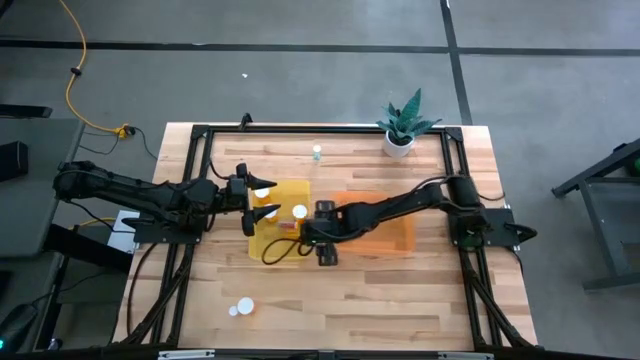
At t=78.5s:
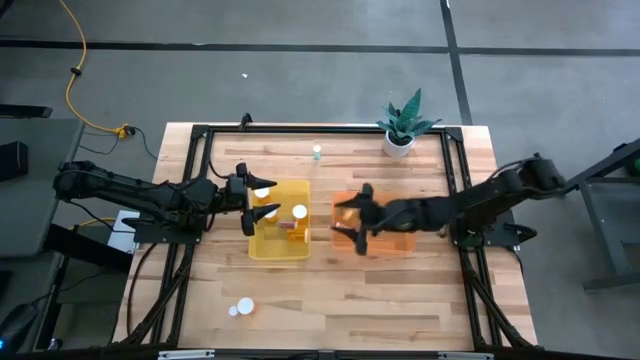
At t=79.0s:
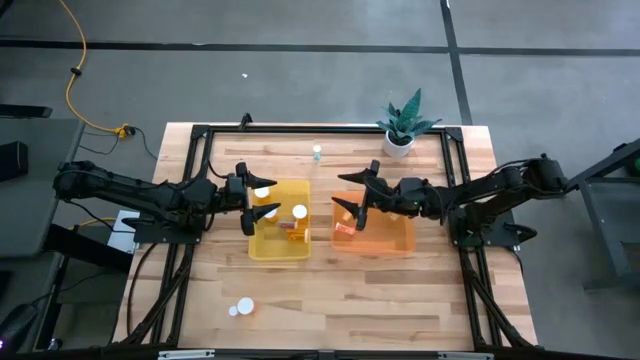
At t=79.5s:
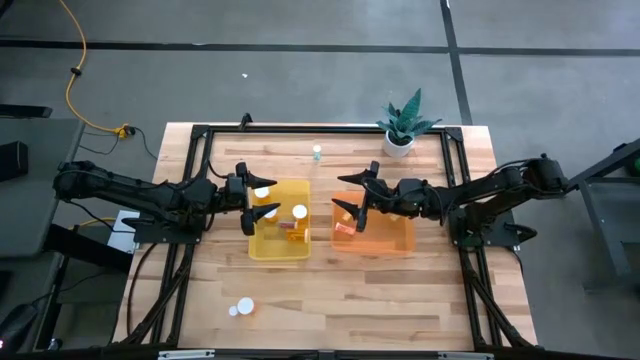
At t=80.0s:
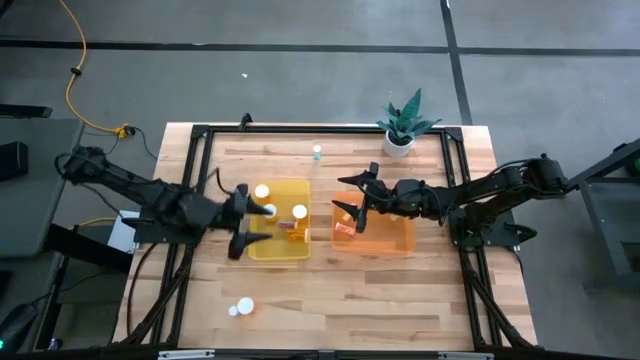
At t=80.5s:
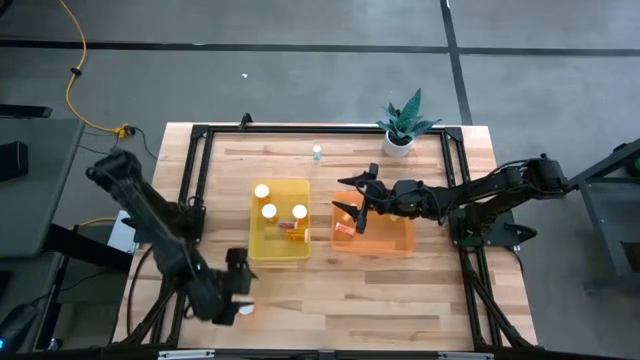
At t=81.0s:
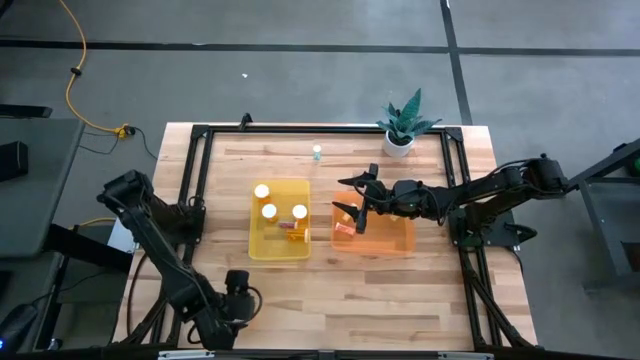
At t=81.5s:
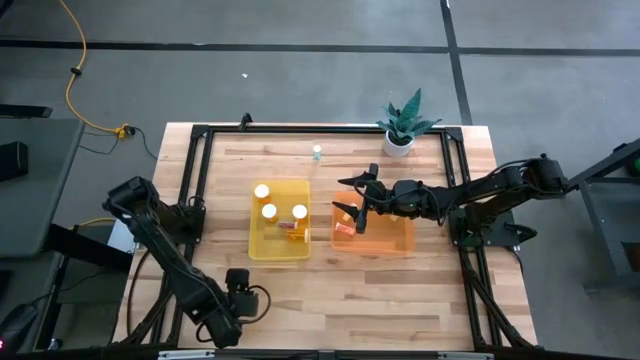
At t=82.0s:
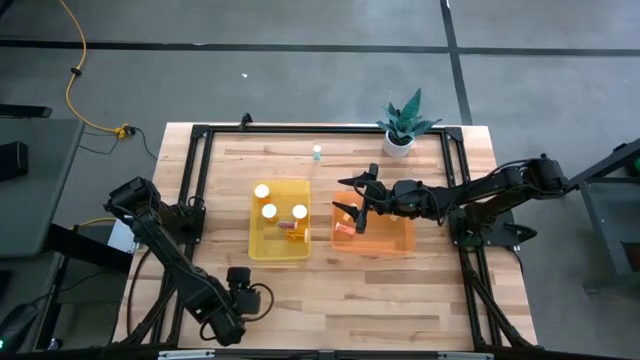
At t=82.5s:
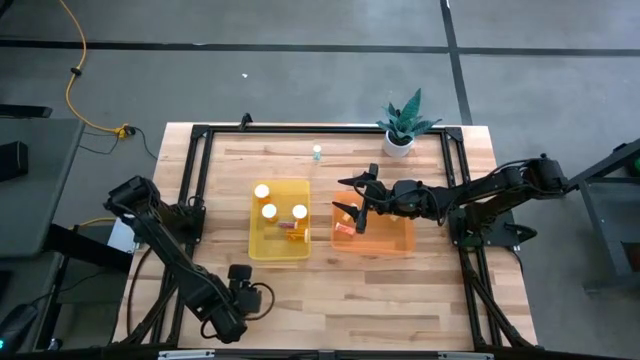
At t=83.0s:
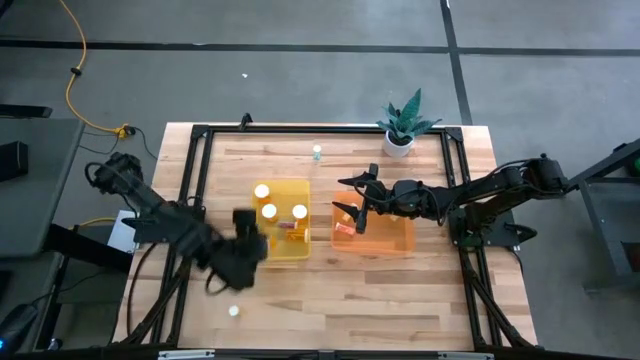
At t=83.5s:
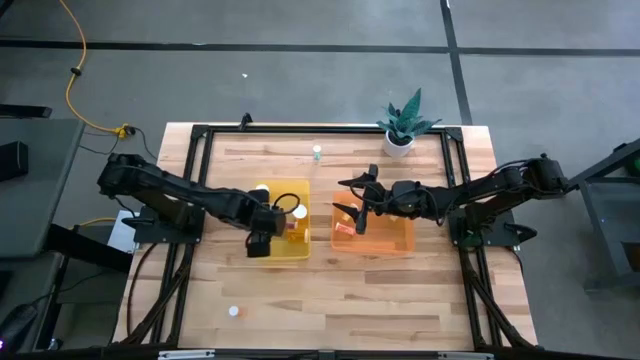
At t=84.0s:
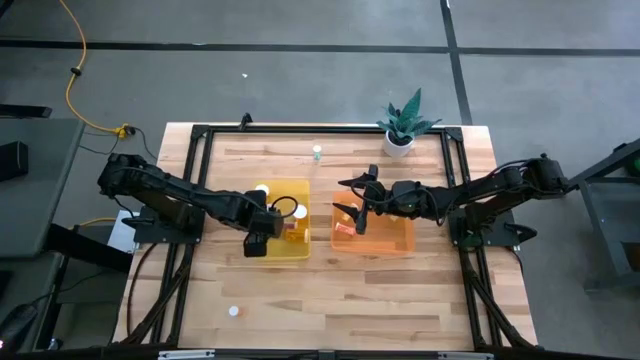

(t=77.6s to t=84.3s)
Task: Pick and place medicine bottles into bin by pill shape (circle, oval)
Put the large orange pill capsule into the yellow bin

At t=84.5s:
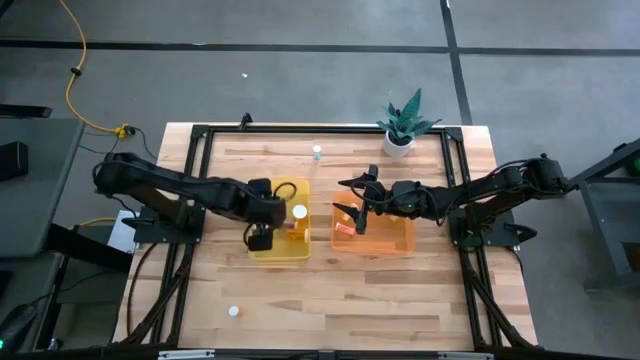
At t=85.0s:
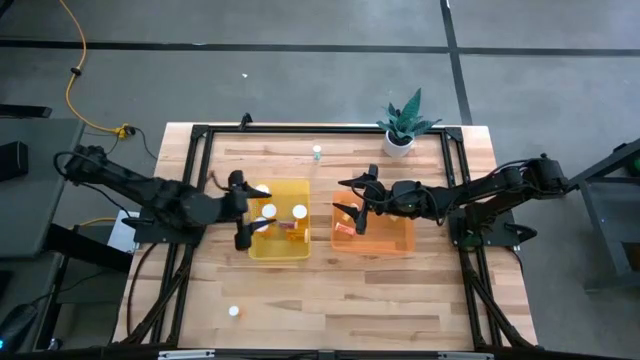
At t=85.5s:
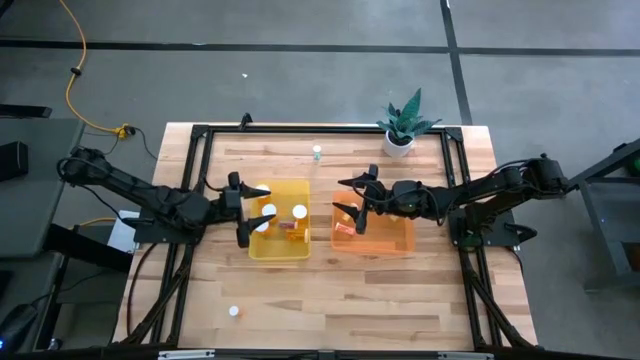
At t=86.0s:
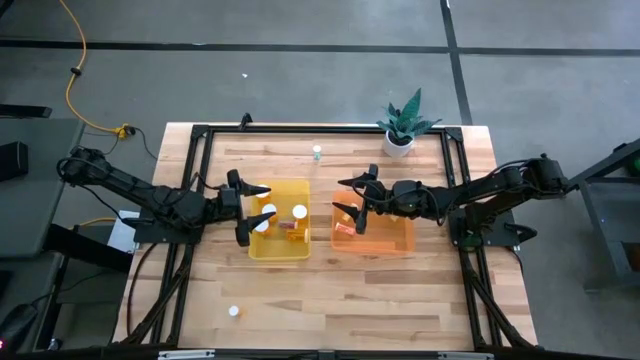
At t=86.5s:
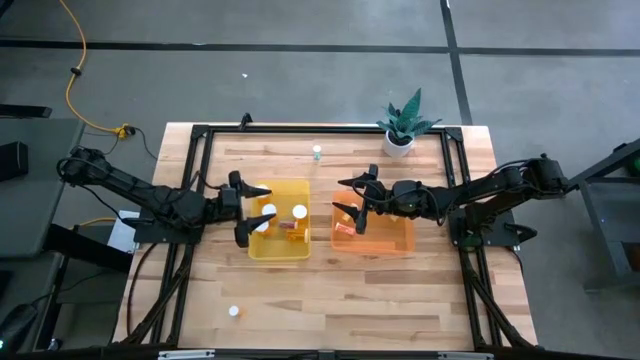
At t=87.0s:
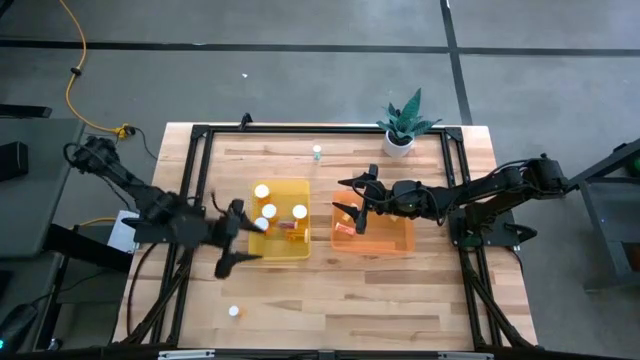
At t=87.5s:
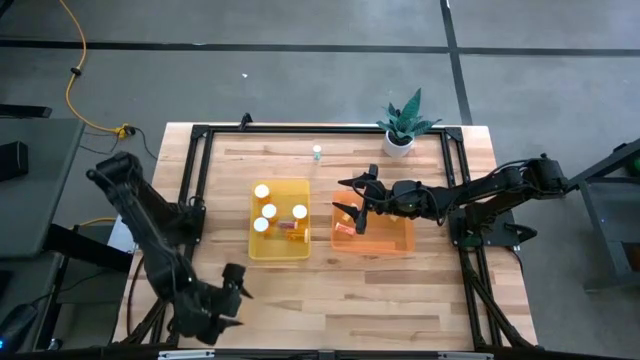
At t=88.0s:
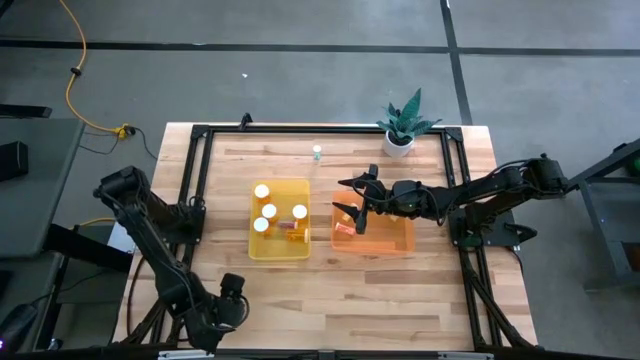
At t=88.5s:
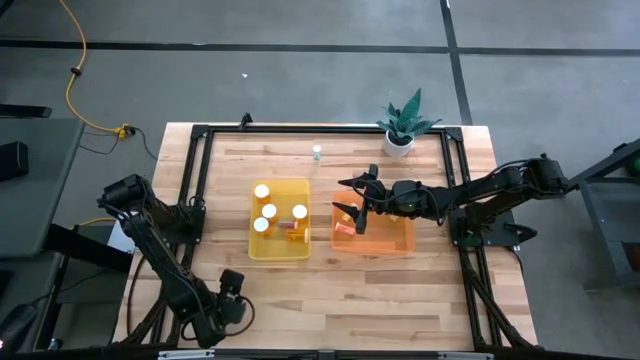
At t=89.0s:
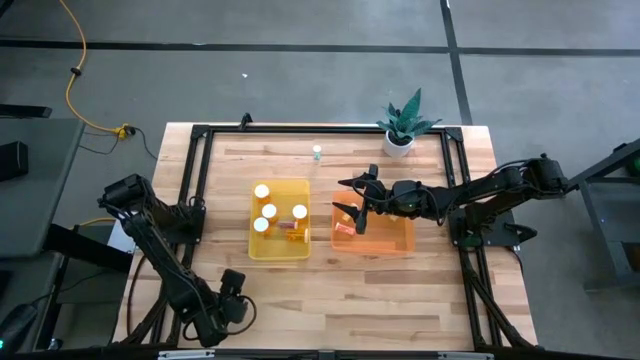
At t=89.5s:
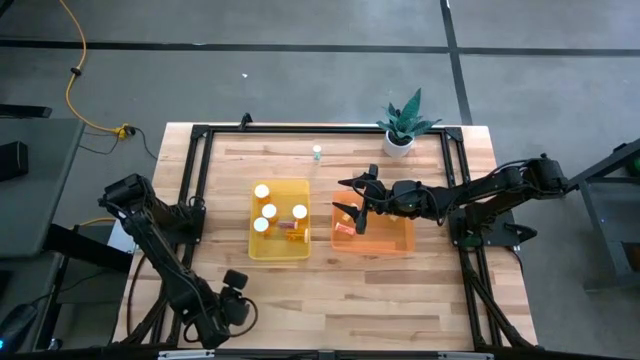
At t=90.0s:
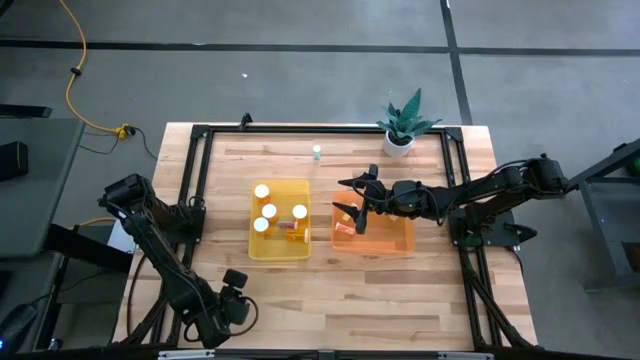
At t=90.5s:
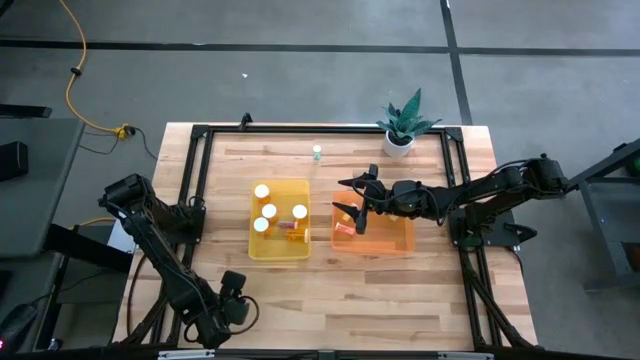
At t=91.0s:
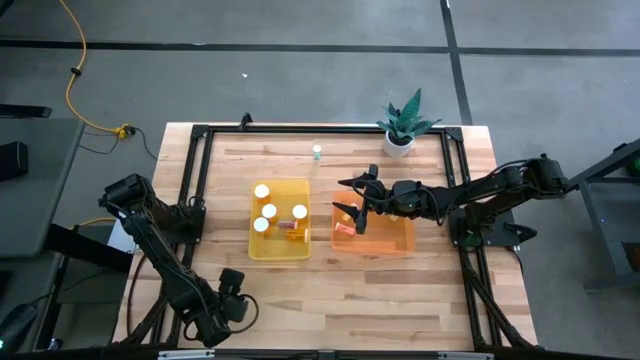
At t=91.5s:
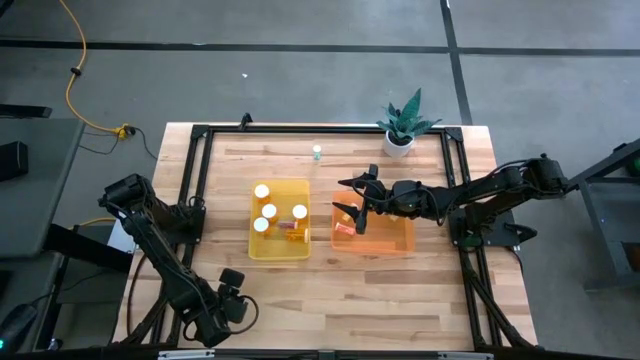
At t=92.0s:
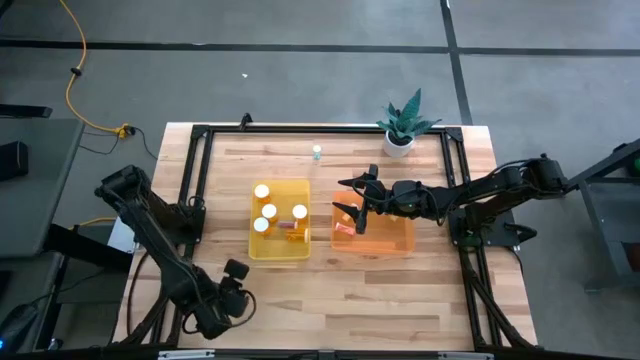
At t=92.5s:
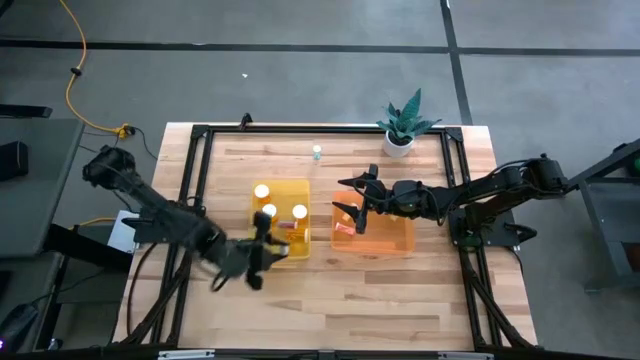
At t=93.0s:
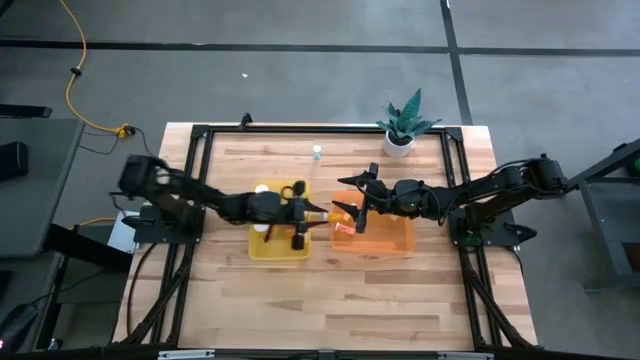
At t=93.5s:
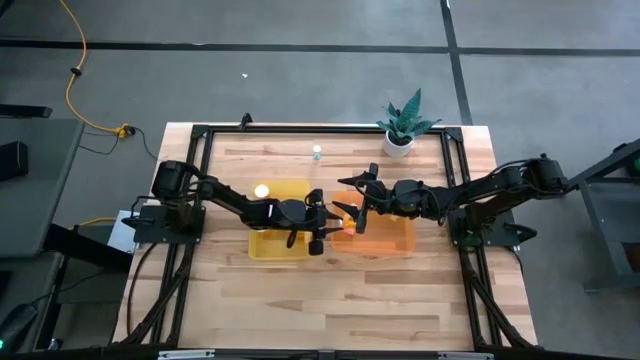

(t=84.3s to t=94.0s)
Put the small orange tablet bottle into the orange bin

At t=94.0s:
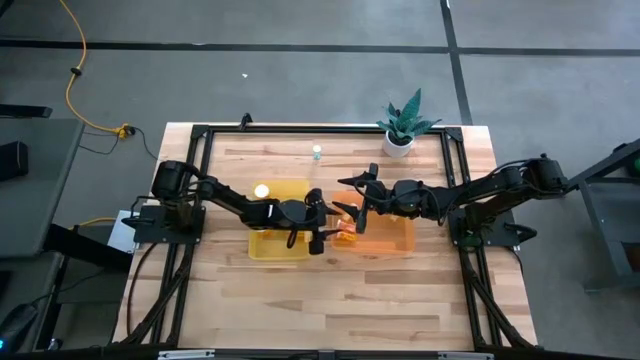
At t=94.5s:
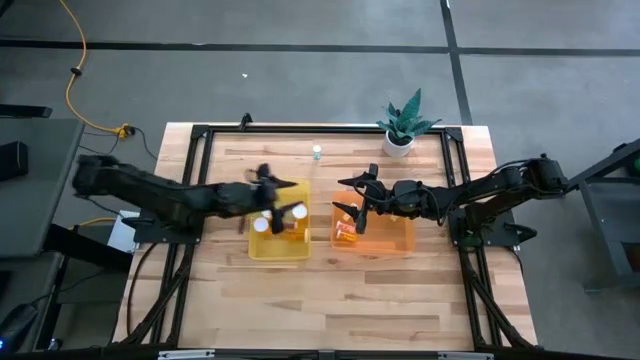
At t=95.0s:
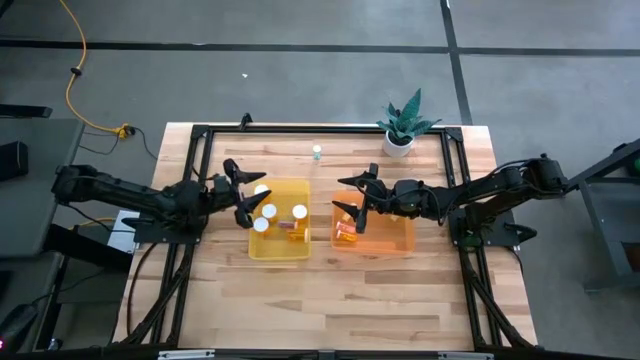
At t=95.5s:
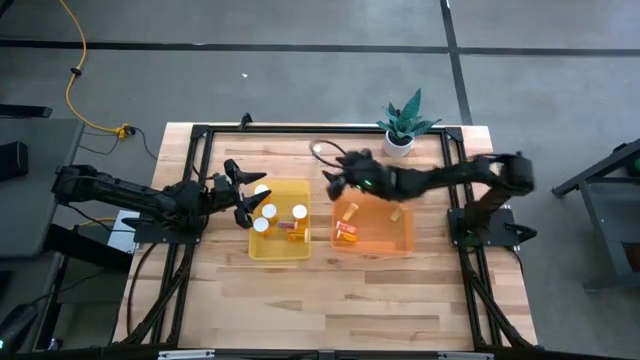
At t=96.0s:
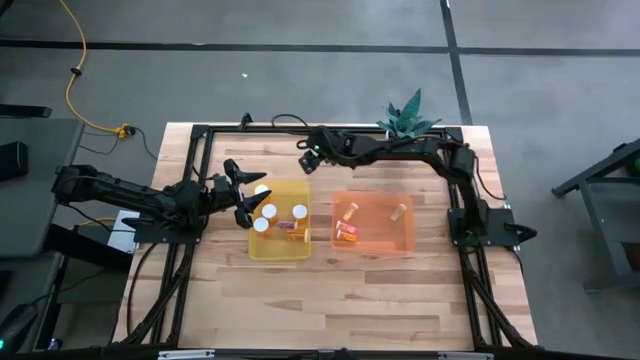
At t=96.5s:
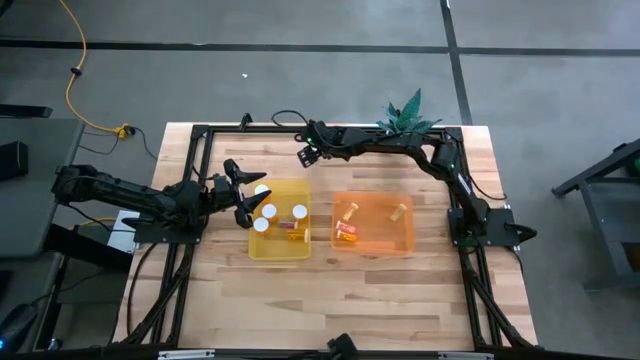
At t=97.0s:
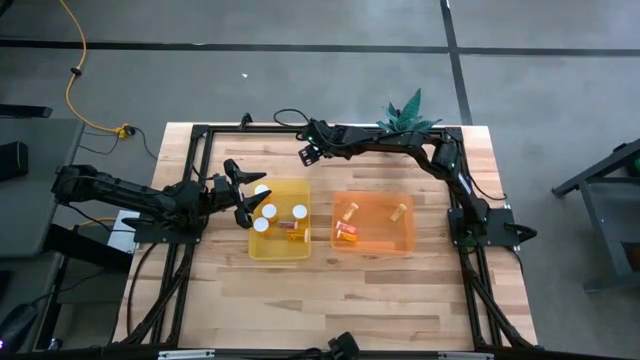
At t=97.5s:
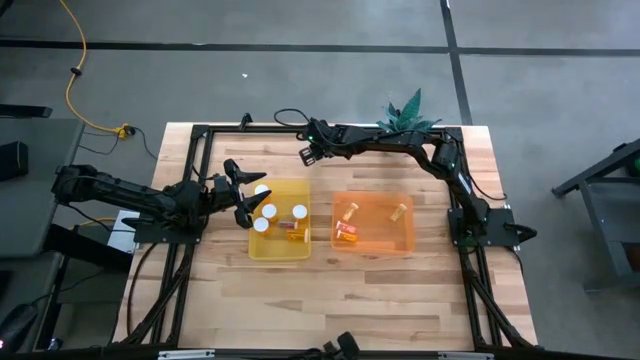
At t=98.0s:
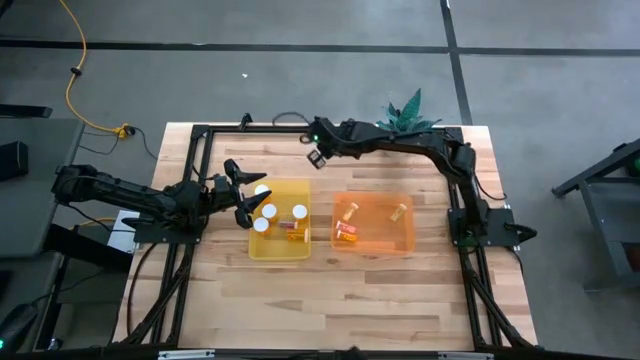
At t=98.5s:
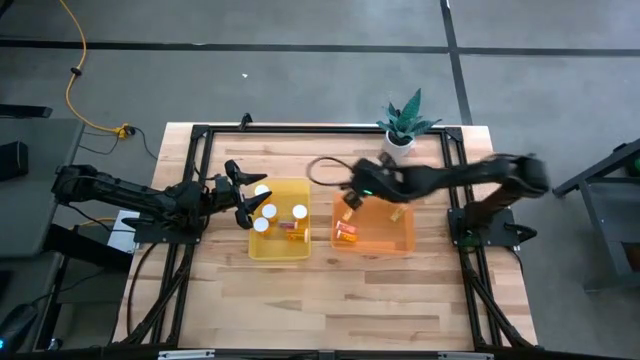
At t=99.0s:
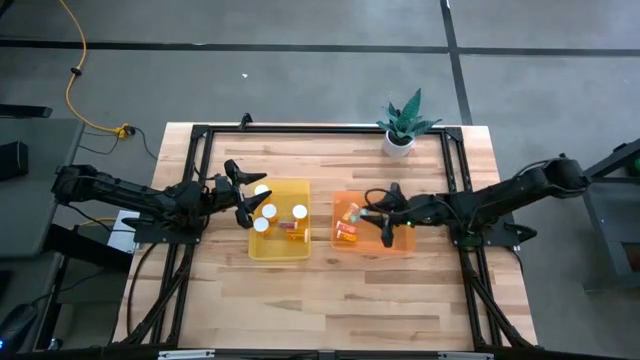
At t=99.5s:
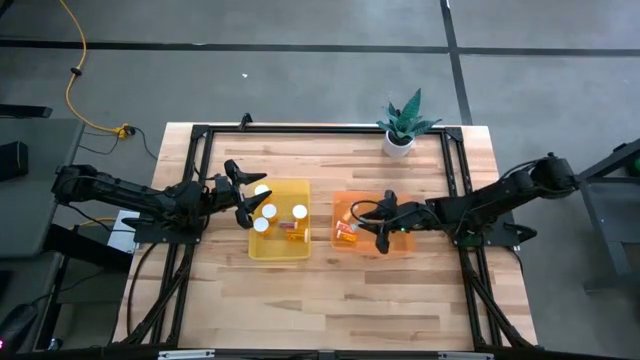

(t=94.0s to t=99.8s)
Put the small green tablet bottle into the orange bin
